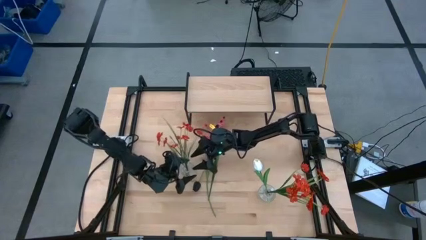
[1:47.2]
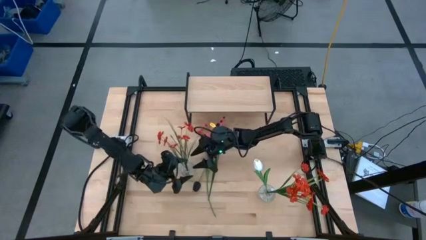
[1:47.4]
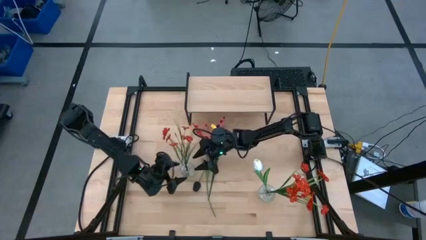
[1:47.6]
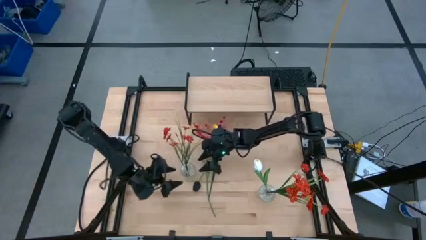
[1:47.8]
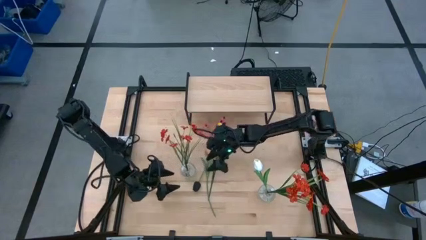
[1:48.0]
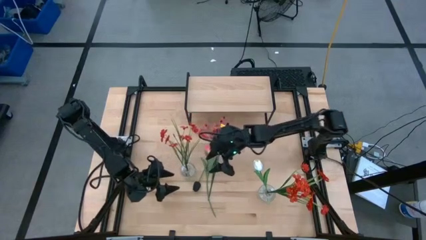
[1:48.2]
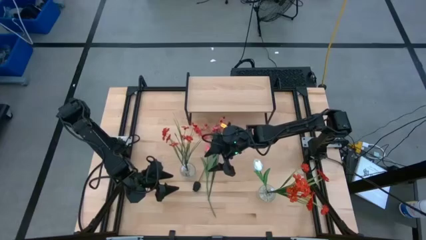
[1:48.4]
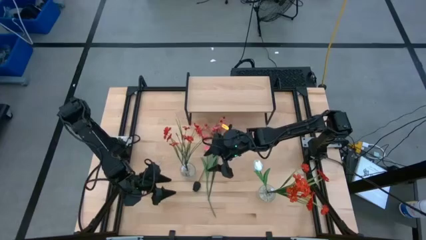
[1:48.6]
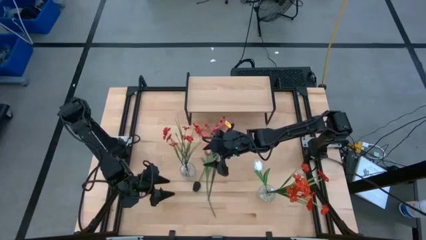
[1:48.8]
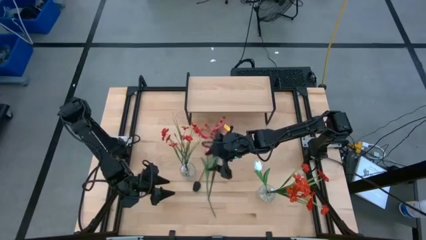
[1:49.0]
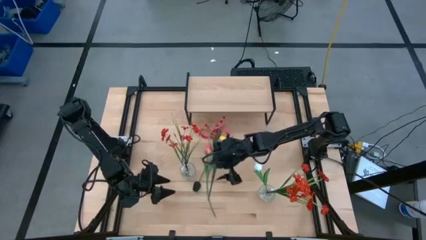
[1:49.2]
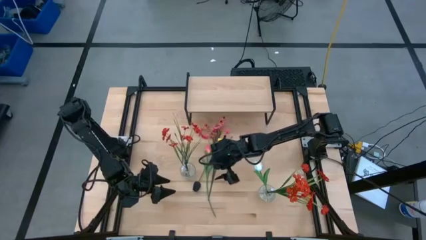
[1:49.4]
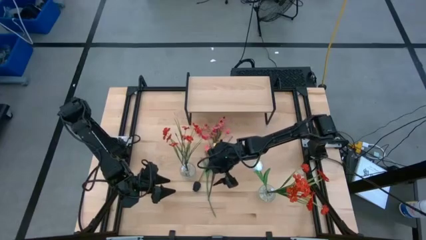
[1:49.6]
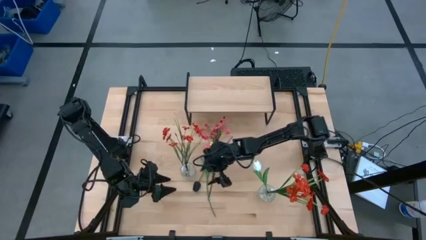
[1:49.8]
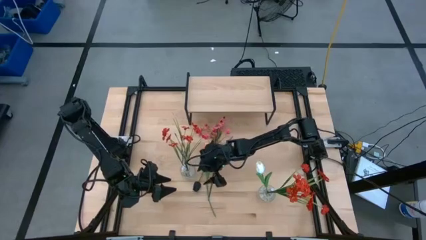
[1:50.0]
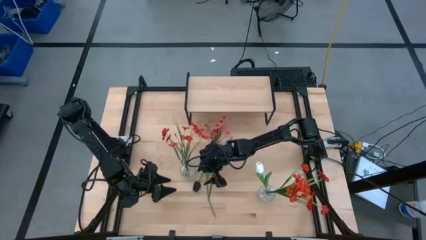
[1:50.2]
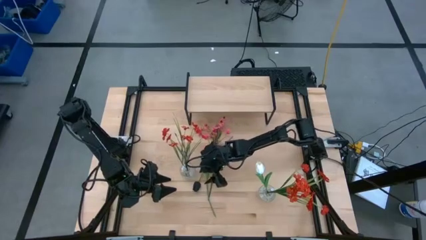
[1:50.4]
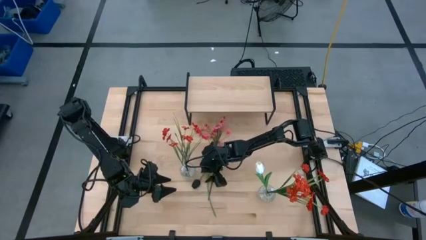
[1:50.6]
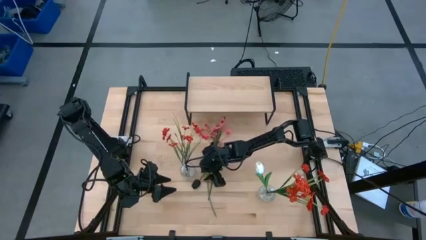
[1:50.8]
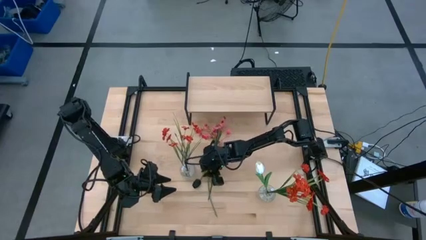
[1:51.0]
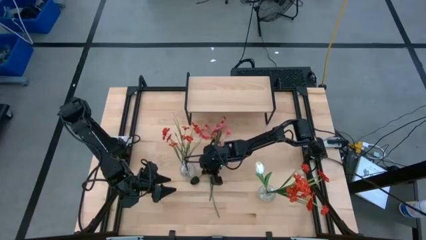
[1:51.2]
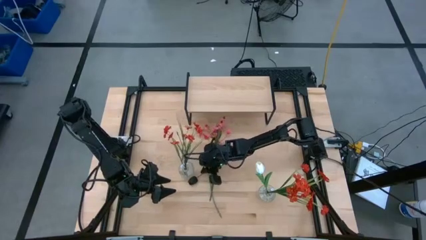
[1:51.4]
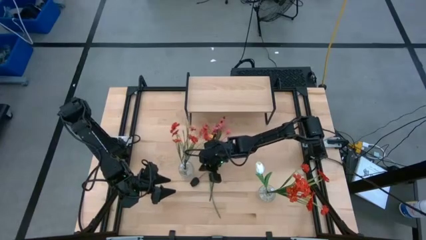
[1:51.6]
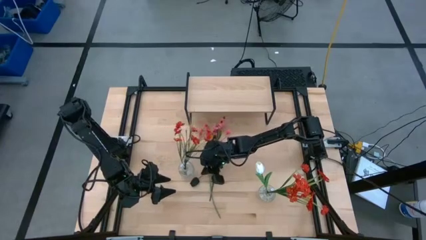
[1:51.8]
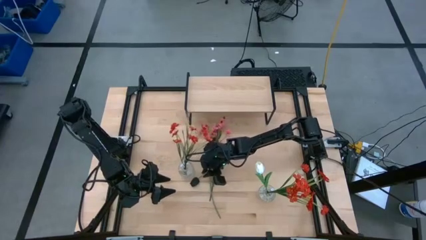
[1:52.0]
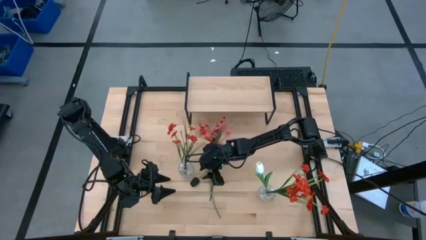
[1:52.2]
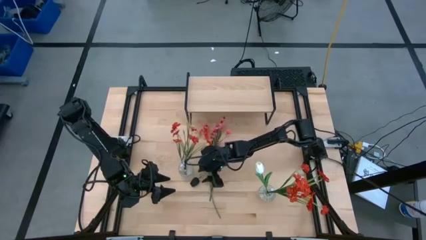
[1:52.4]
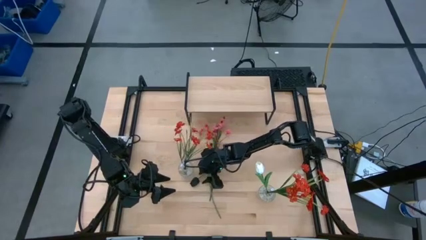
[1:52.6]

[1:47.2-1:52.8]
Task: Pick and place flowers into a vace then onto a shelf
Put the black flower into the left transparent vase

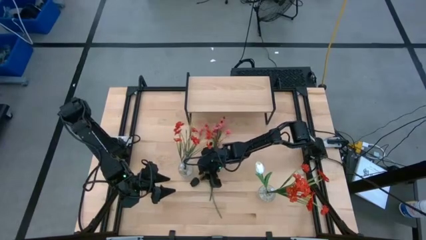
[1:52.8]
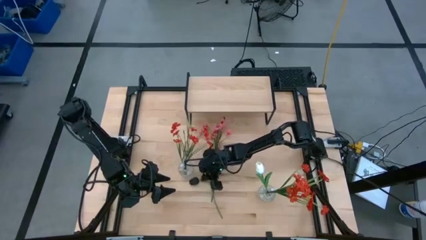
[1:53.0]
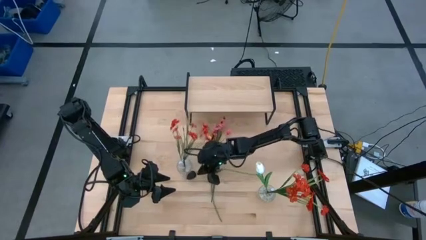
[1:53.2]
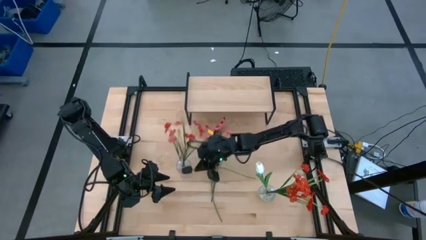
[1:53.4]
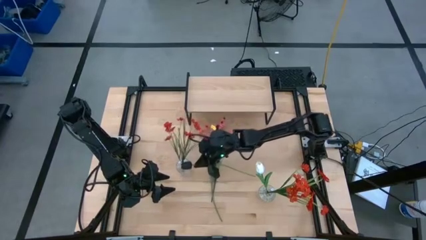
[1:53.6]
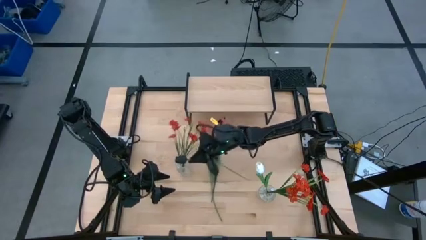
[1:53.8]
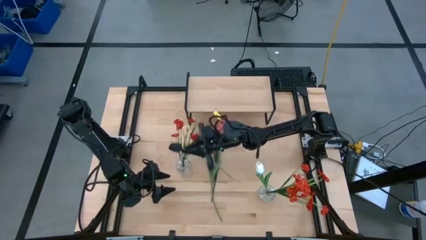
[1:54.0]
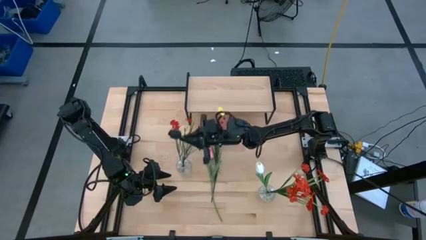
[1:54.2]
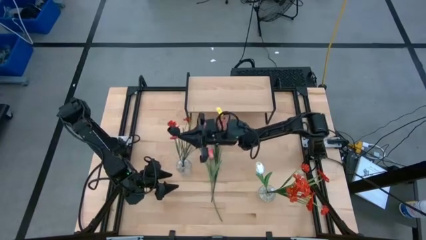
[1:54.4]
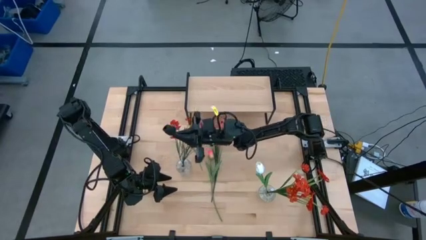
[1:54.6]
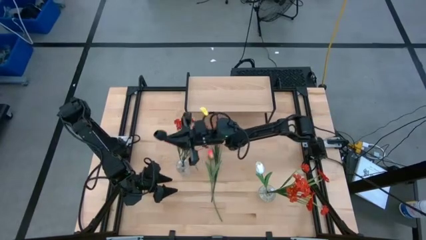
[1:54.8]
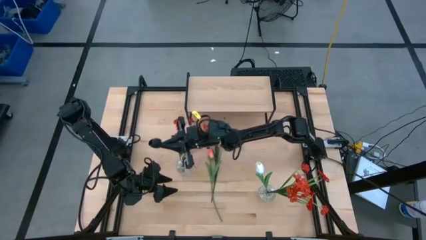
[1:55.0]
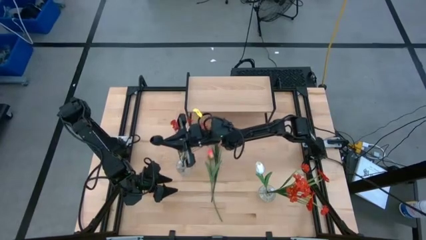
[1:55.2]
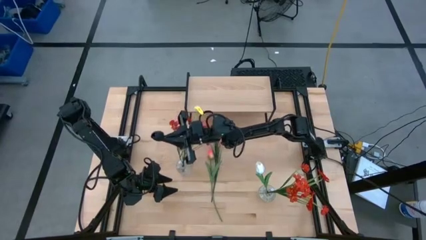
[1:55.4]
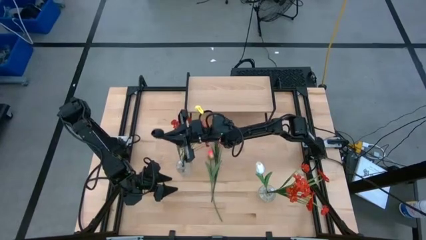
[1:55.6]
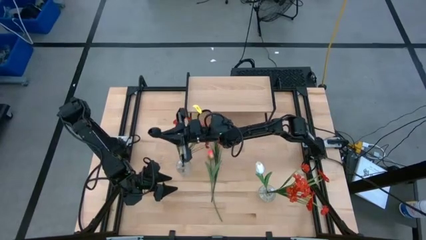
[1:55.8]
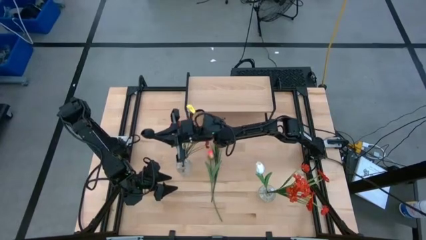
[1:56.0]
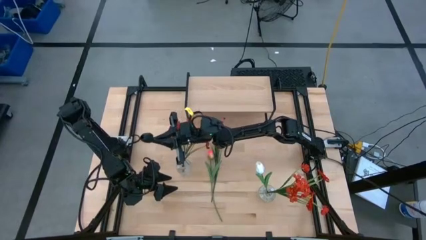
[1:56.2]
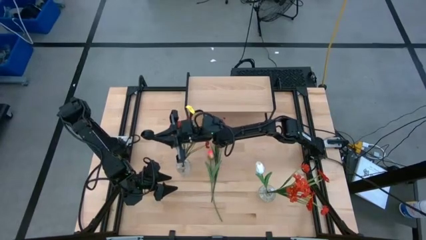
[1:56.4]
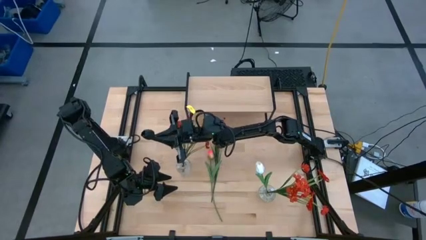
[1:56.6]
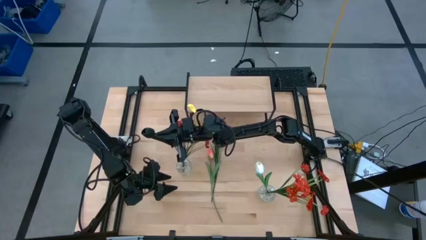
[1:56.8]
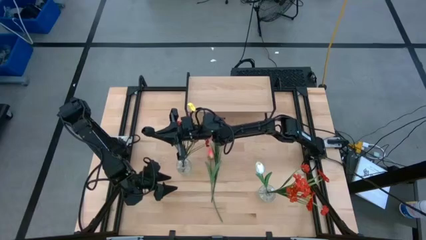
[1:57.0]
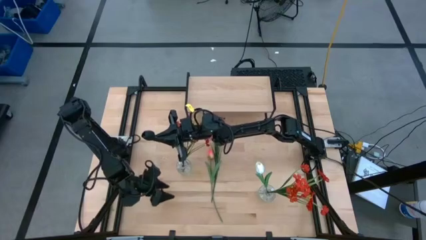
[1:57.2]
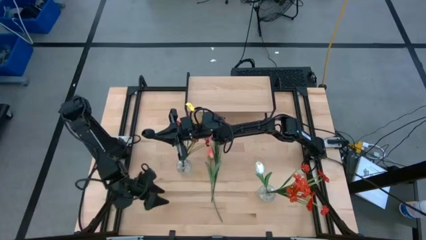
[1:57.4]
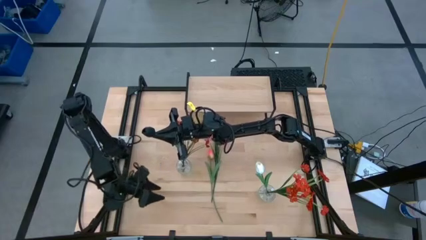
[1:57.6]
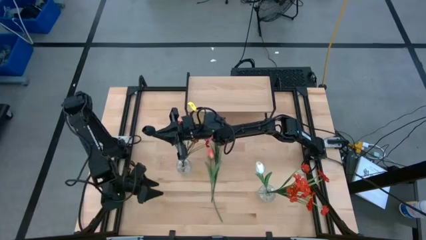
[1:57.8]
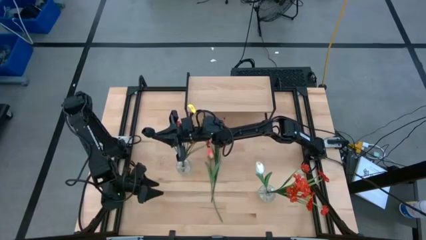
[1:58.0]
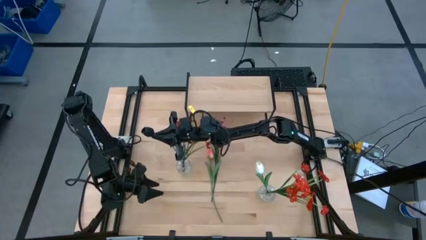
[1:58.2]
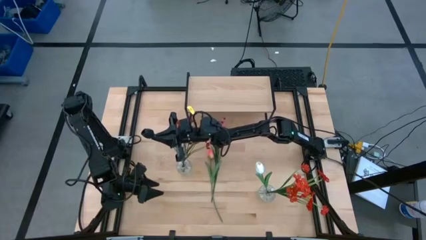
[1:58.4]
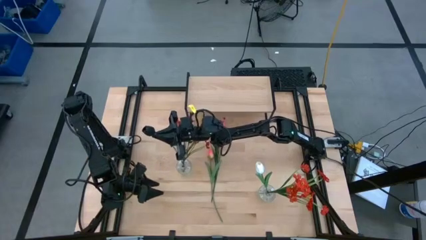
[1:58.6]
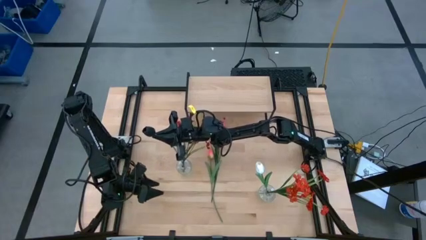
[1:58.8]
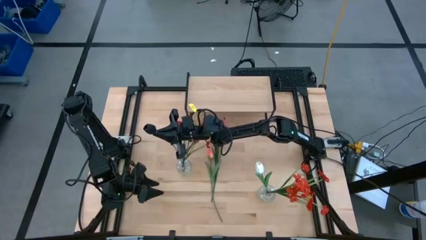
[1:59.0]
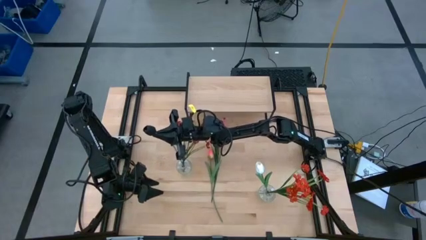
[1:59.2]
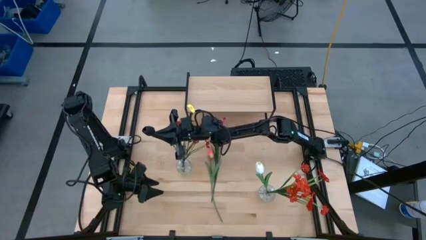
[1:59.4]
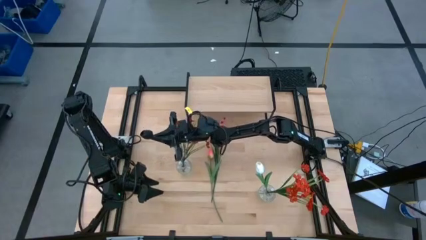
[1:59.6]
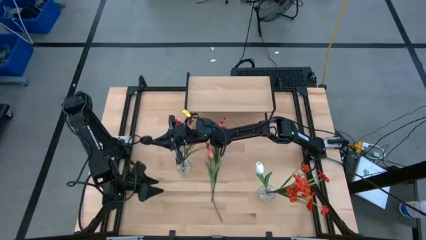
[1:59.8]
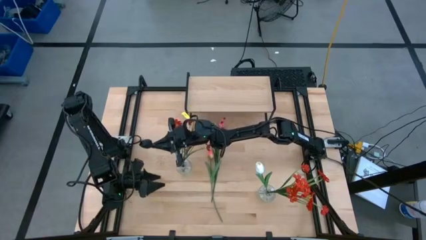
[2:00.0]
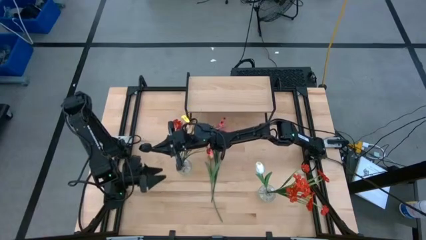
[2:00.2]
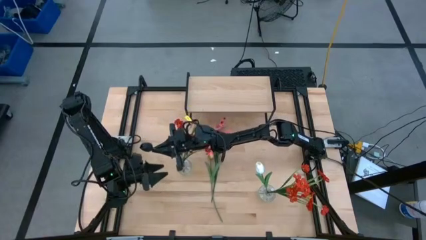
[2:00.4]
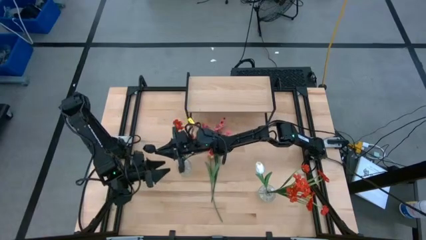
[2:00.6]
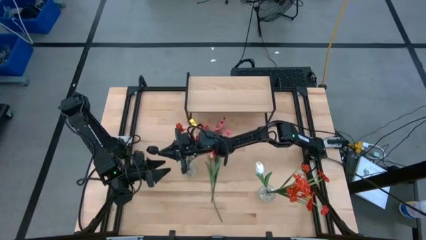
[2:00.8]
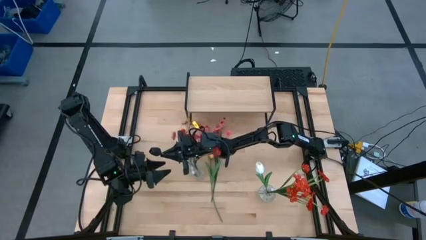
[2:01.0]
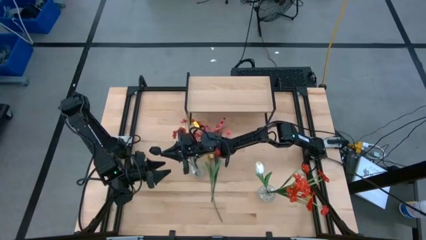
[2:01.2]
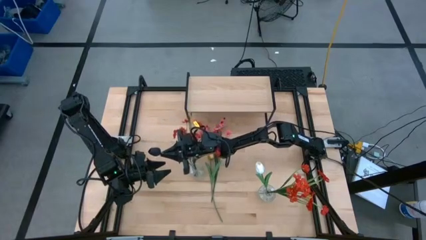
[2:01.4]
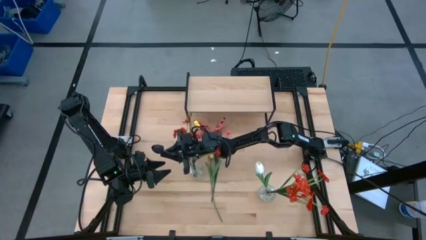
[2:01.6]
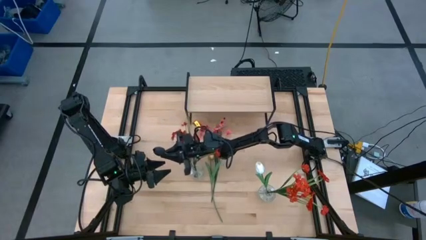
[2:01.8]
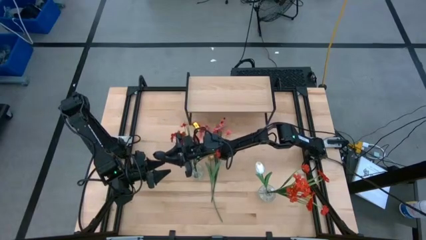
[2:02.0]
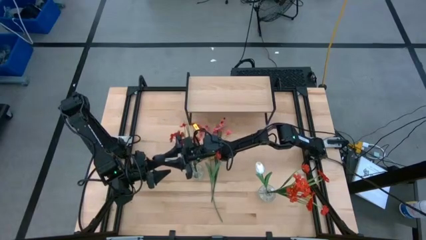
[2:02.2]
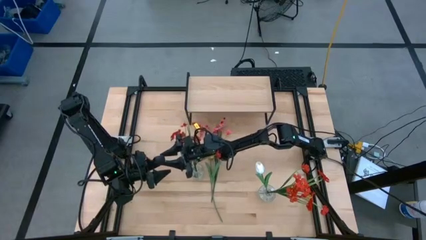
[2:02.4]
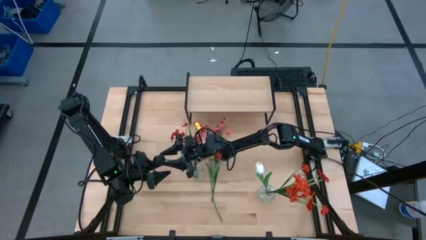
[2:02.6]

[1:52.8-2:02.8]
Put the black flower into the left transparent vase
